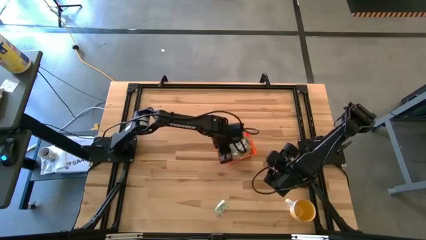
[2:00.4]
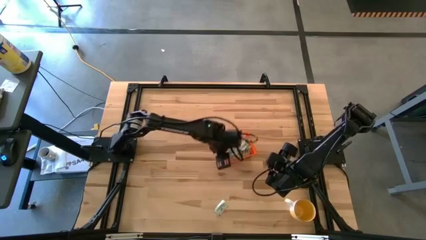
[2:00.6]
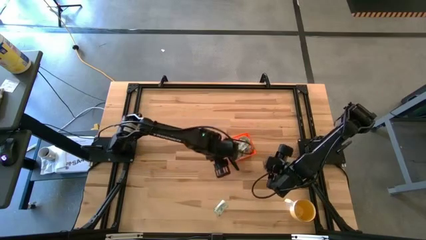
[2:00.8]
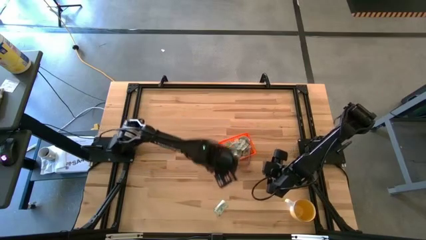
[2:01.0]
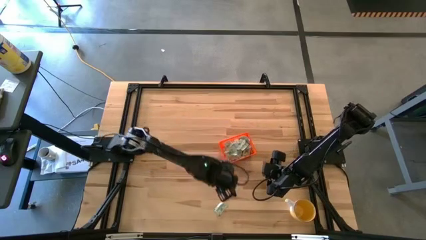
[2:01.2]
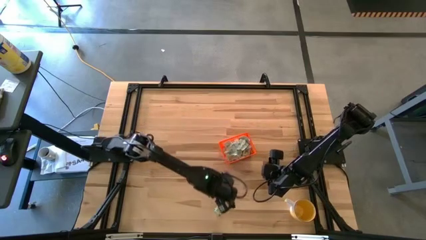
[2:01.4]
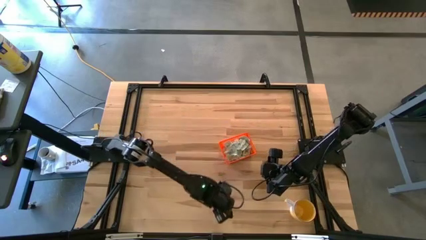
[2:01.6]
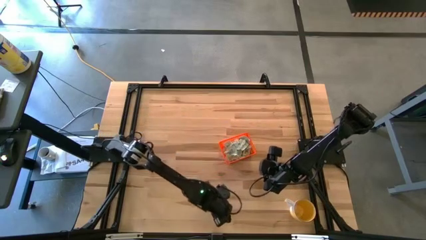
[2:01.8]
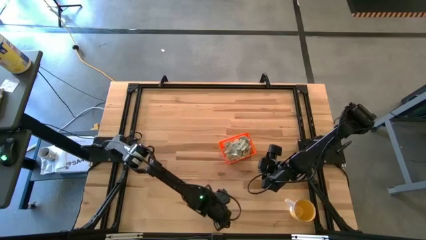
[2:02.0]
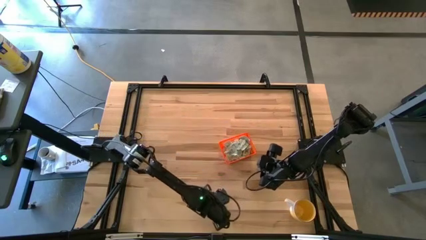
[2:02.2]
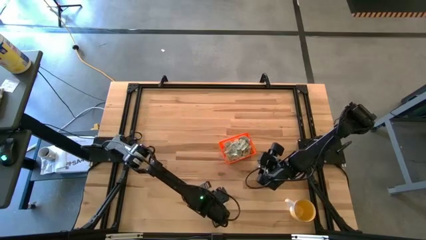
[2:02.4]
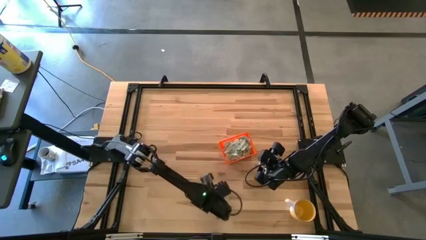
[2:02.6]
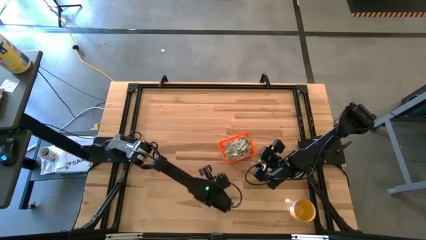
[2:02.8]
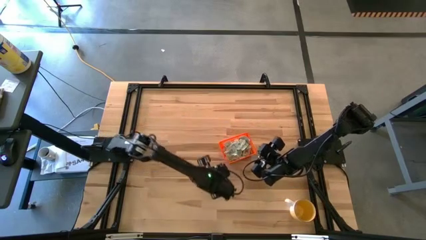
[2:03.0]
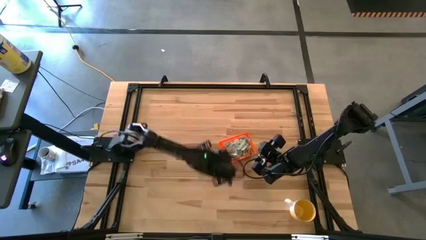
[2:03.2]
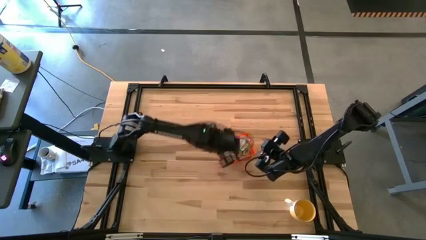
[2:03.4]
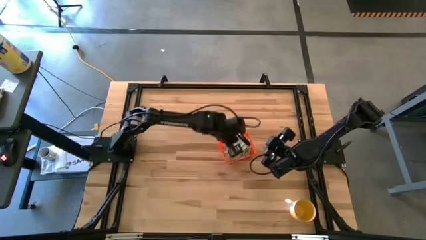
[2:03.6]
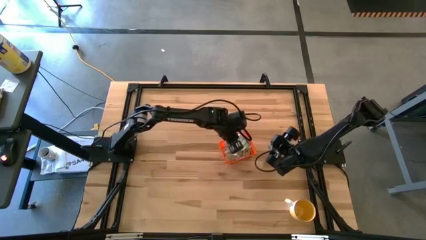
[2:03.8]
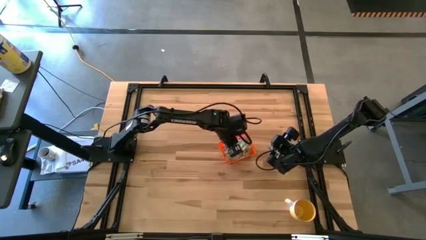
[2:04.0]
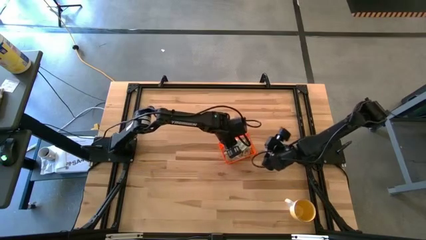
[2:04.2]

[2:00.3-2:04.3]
Task: Pick and place Stevia / Truvia into bins
Put the white stevia packet into the orange bin

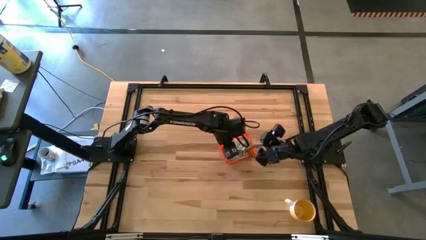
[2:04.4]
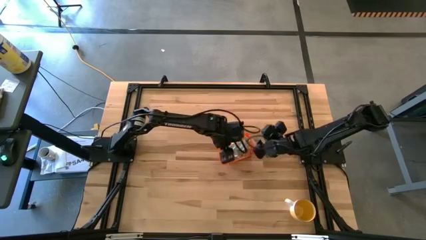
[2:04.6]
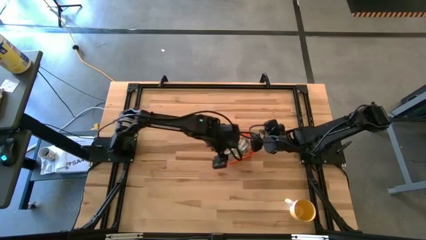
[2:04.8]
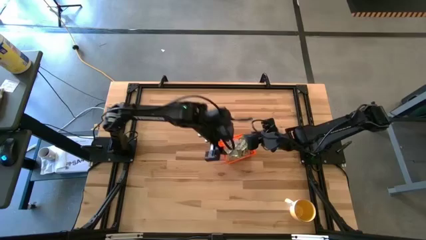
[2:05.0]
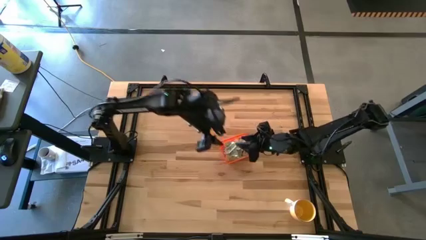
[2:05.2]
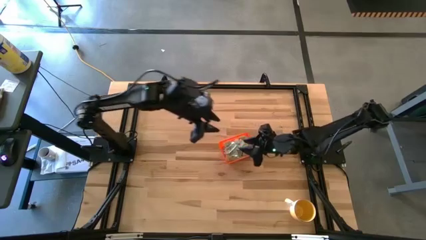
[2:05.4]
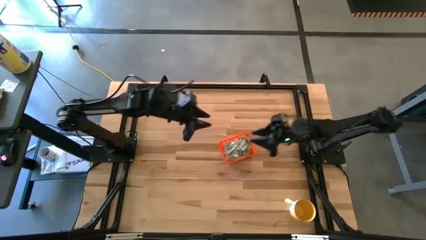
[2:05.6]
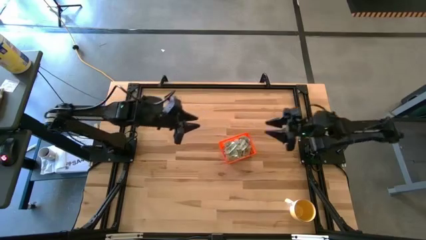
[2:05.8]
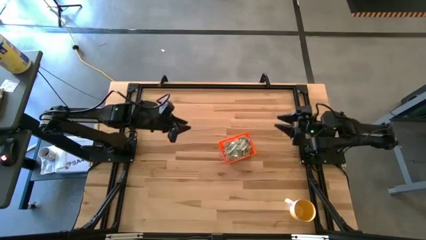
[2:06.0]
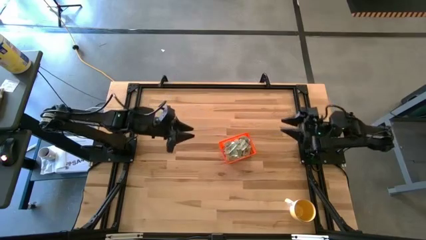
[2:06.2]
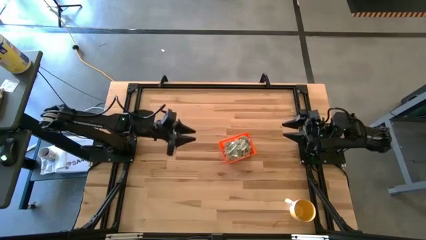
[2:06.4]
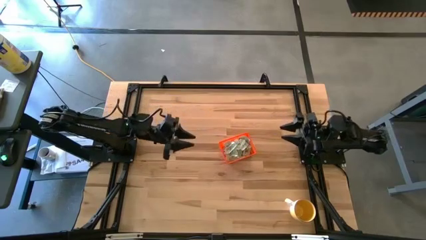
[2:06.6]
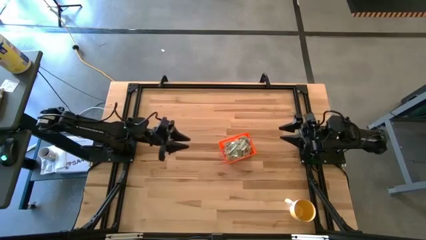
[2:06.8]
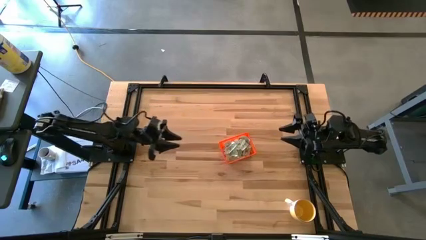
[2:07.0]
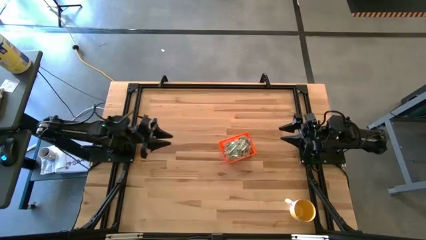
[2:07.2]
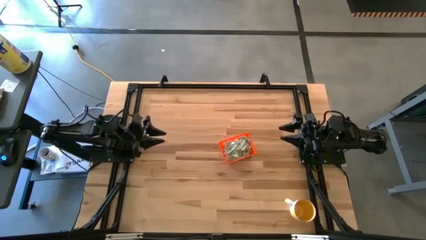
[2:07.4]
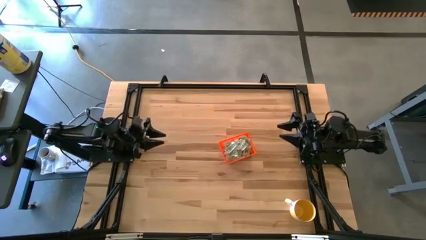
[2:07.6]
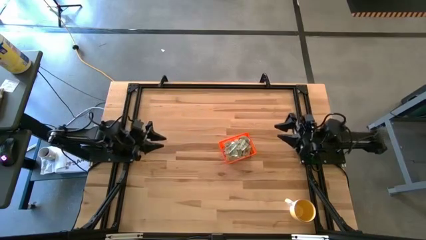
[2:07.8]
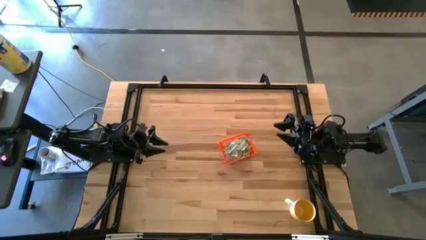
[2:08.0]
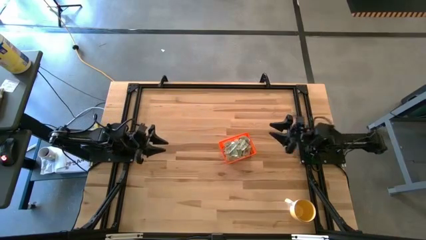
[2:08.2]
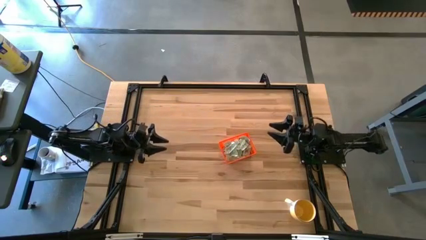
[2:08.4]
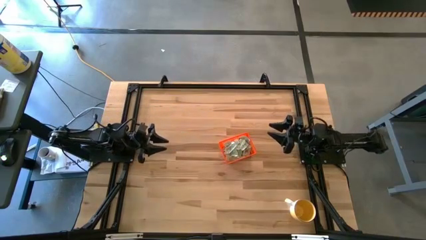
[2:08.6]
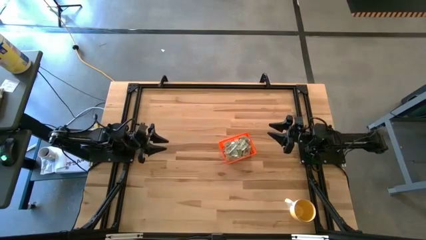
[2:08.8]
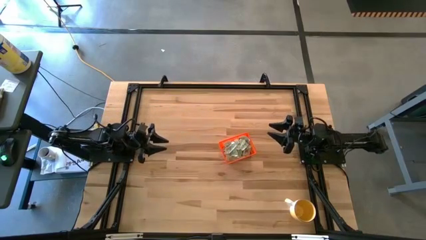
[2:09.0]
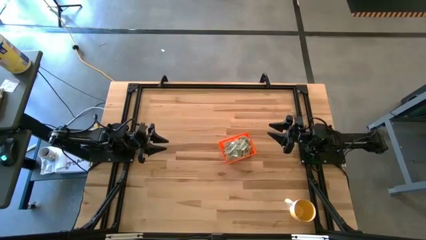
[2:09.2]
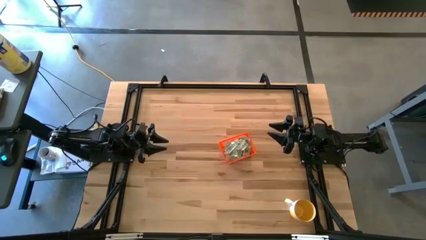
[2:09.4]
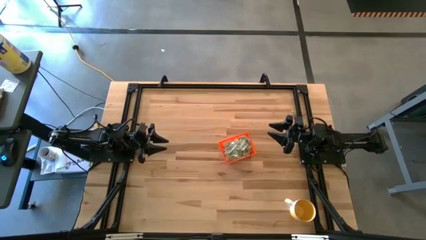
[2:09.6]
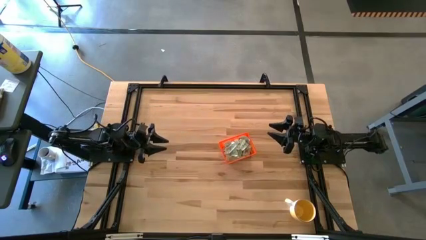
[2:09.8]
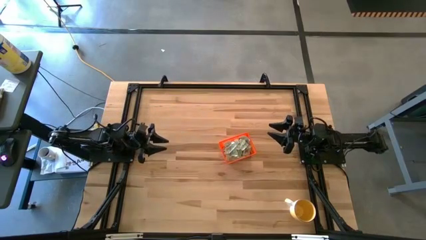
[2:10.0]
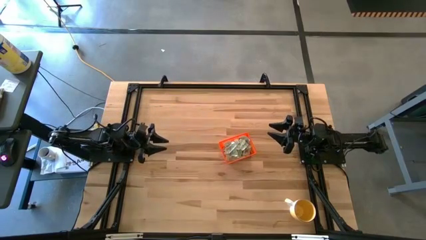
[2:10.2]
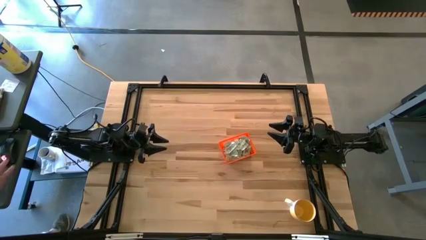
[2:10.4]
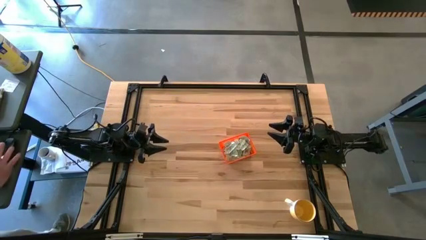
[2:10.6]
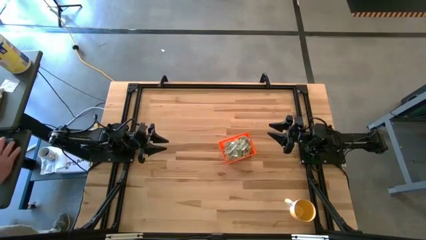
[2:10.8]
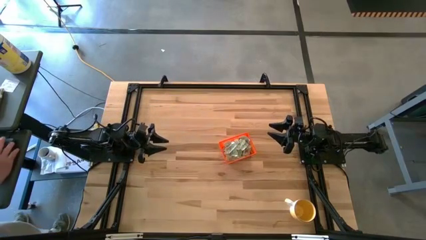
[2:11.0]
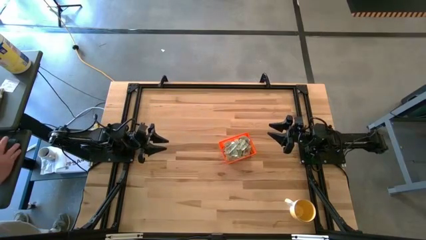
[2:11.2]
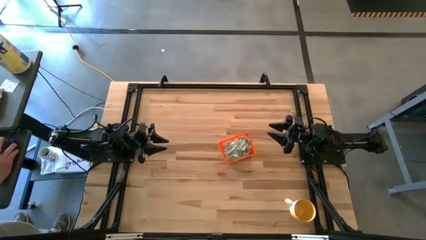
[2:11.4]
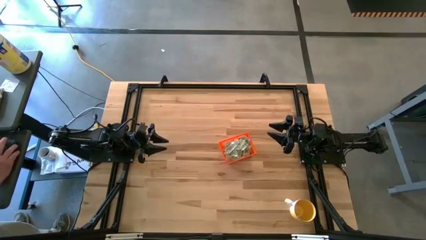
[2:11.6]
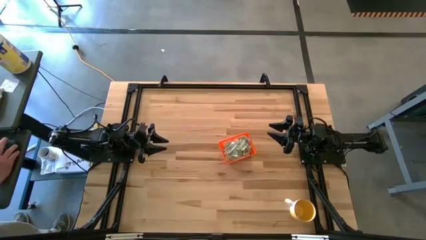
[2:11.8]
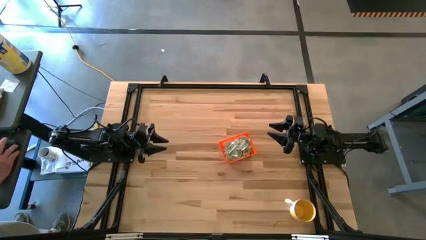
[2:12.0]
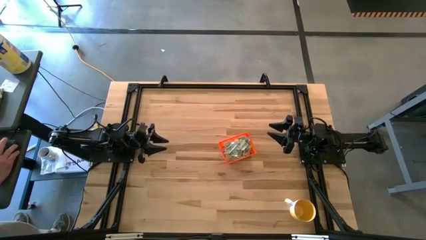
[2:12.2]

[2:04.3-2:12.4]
Return to Home Position

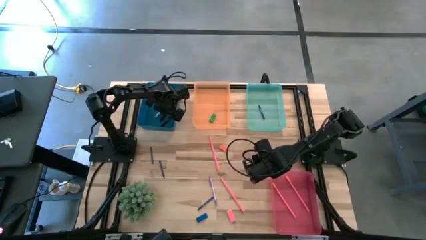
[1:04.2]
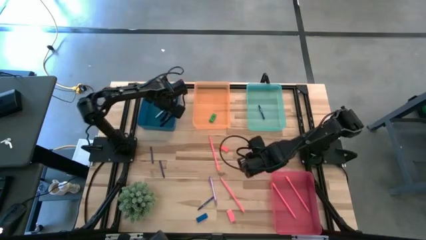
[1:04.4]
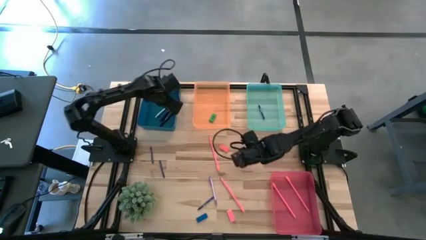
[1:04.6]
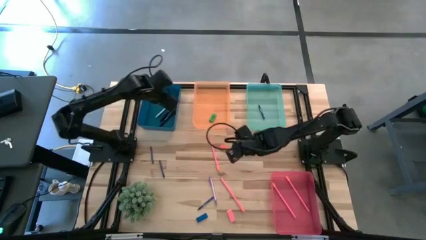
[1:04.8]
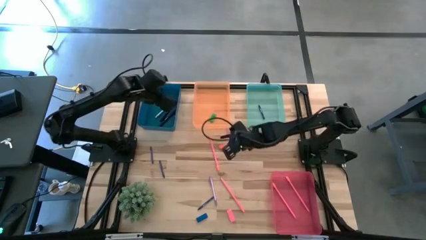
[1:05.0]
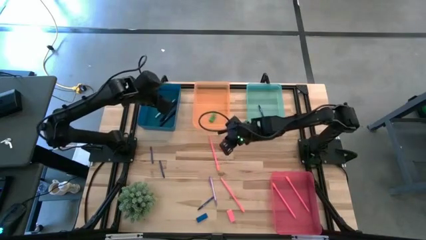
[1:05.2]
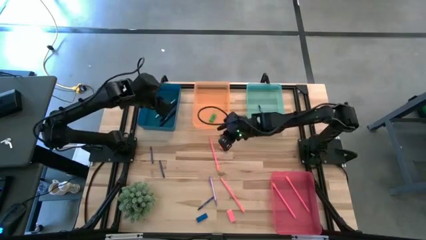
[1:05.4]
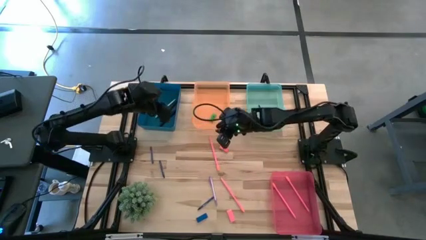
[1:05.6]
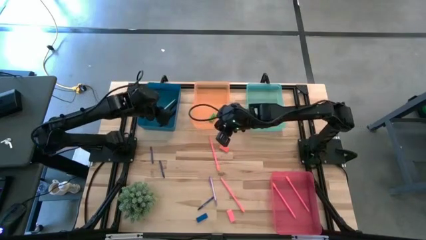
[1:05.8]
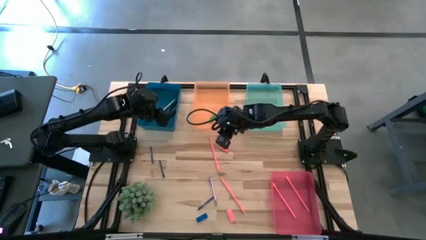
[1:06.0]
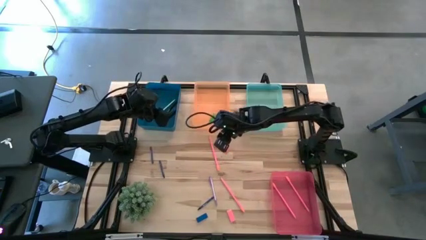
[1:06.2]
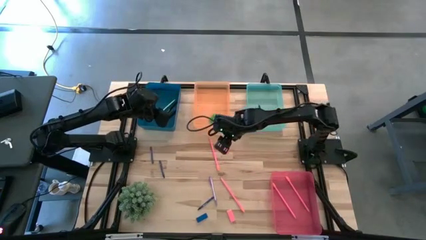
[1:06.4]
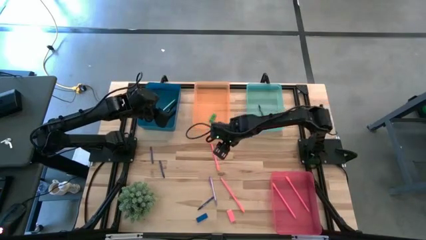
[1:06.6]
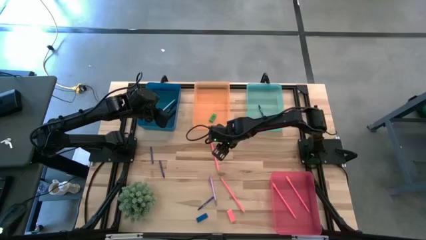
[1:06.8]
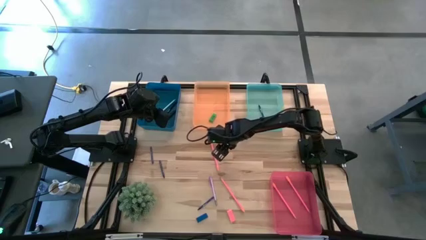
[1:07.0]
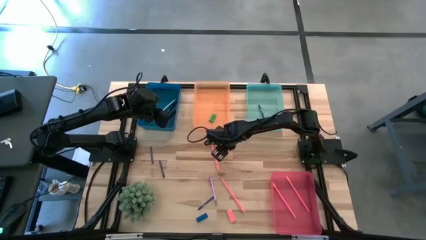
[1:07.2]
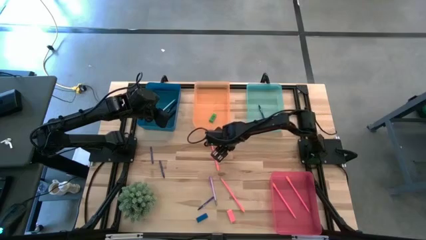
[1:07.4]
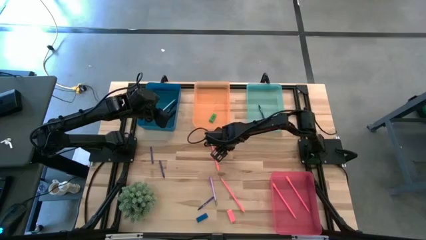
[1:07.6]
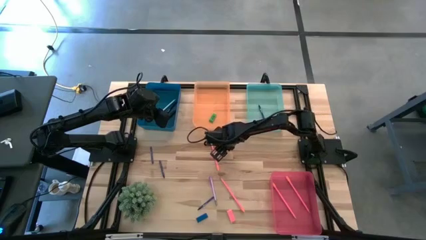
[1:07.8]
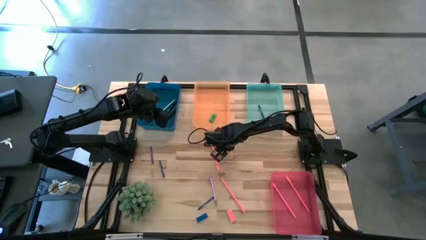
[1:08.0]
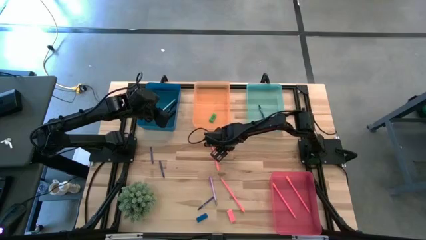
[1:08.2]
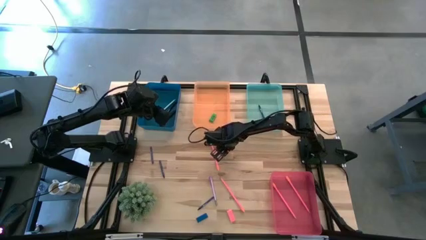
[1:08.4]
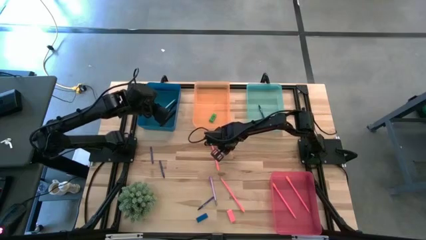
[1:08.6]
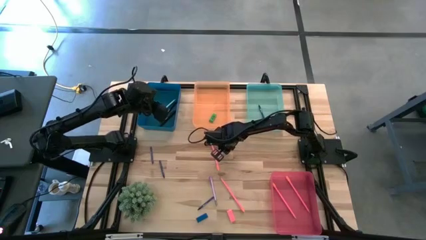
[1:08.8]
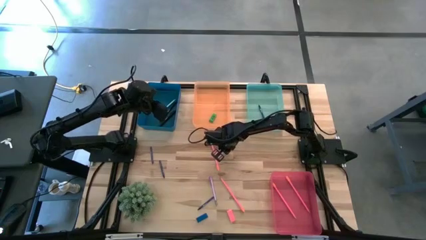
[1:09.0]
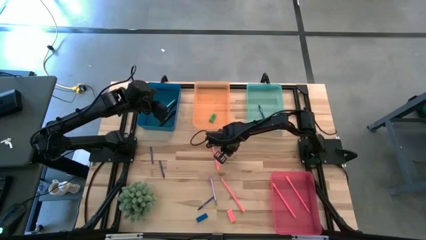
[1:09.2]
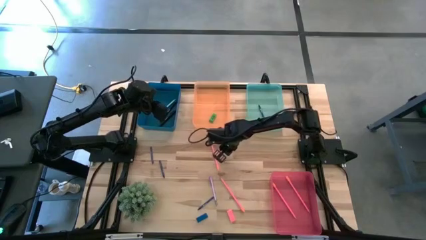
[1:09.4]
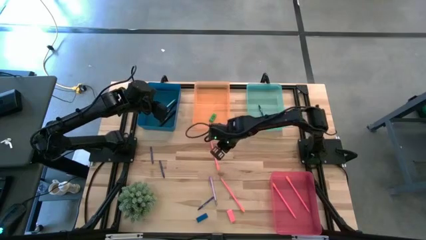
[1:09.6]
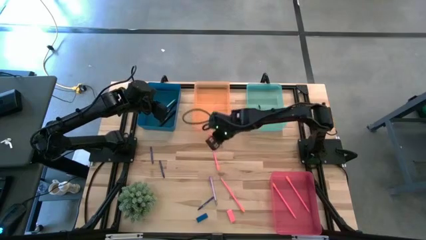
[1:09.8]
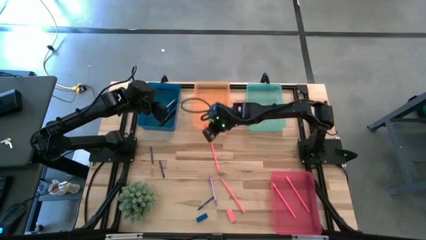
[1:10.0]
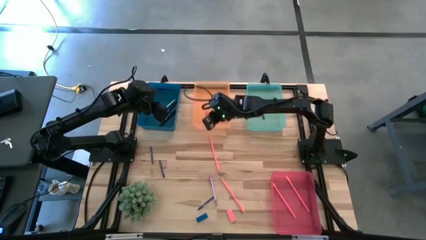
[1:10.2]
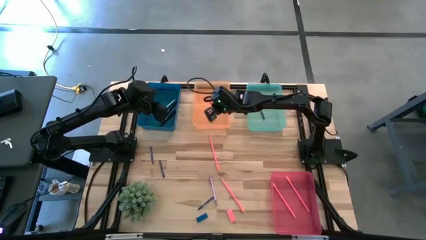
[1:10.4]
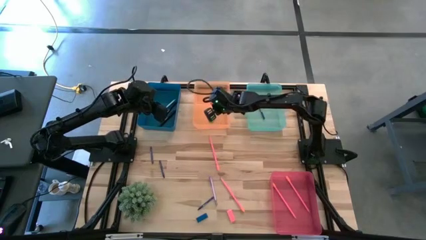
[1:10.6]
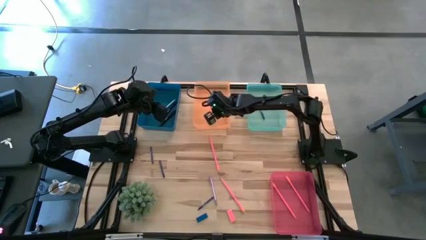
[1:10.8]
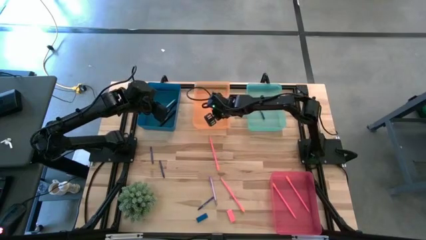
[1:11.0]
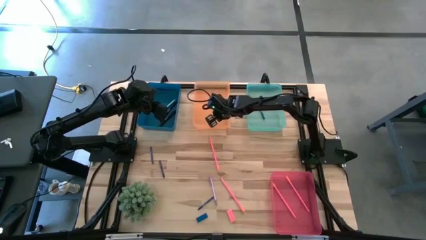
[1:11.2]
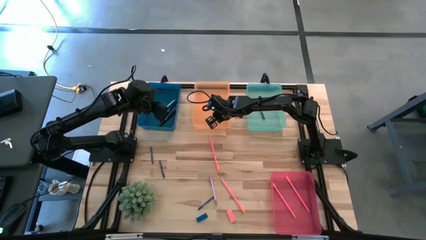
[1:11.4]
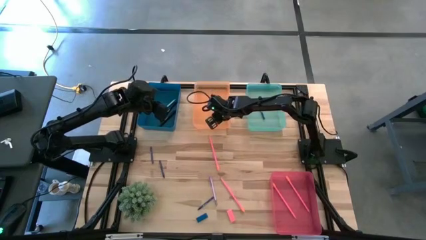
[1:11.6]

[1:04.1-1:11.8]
Task: Sort crayons/erasers/pens/pencils in bins
Put the orange eraser into the orange bin
